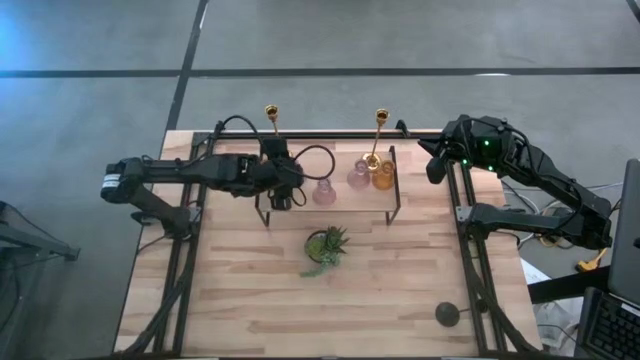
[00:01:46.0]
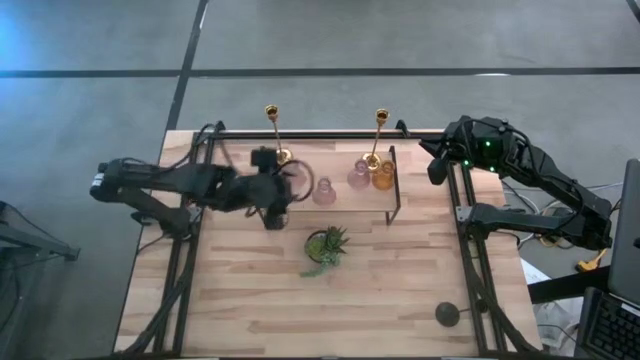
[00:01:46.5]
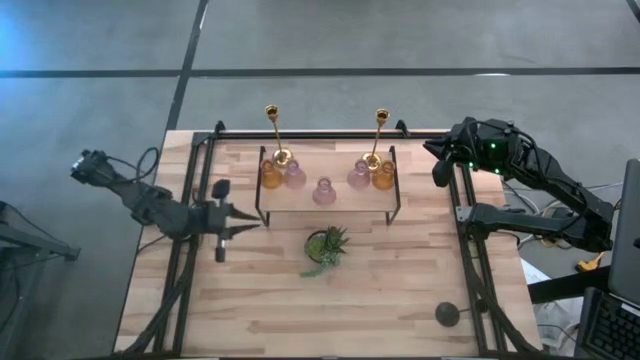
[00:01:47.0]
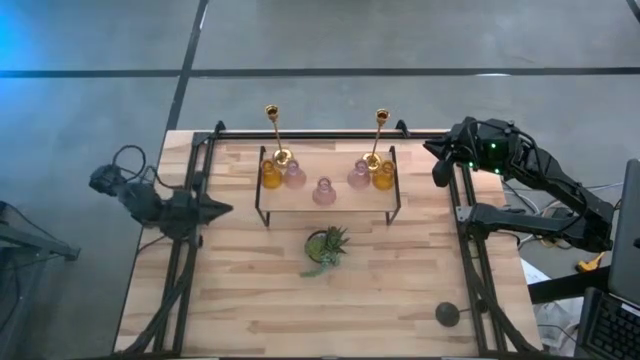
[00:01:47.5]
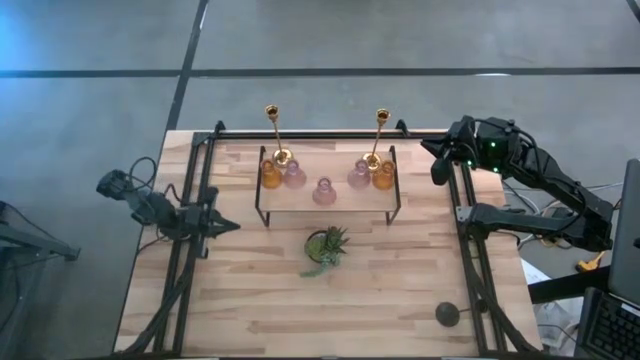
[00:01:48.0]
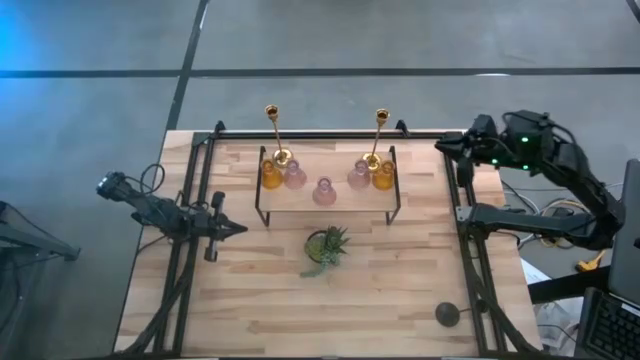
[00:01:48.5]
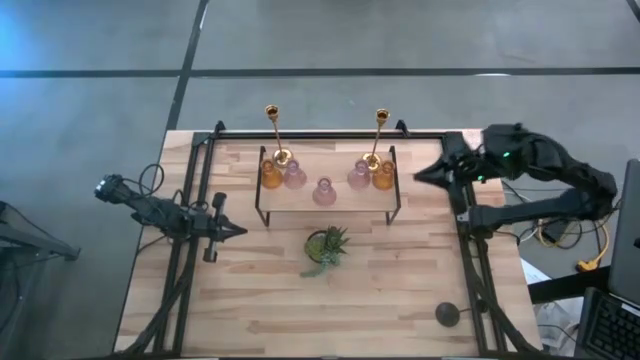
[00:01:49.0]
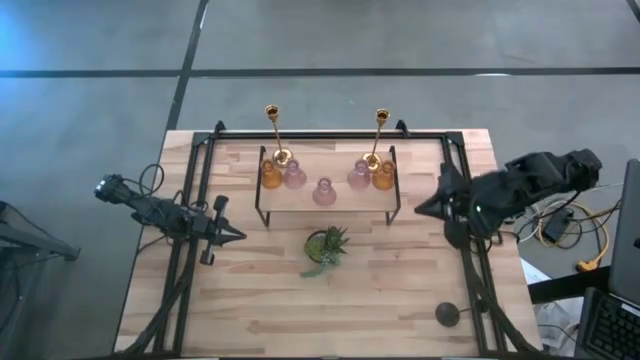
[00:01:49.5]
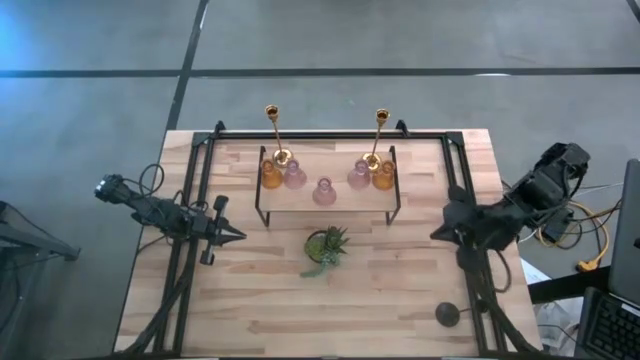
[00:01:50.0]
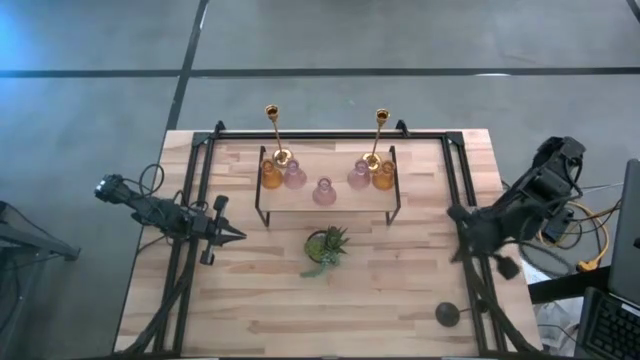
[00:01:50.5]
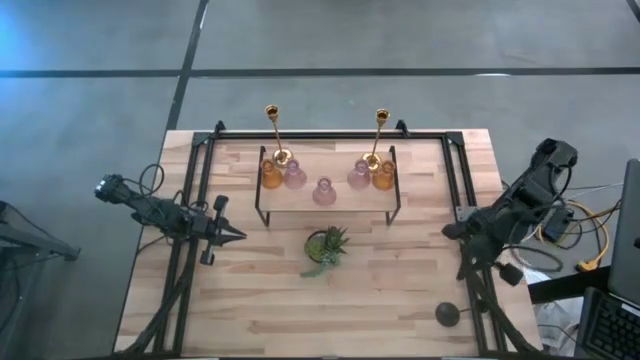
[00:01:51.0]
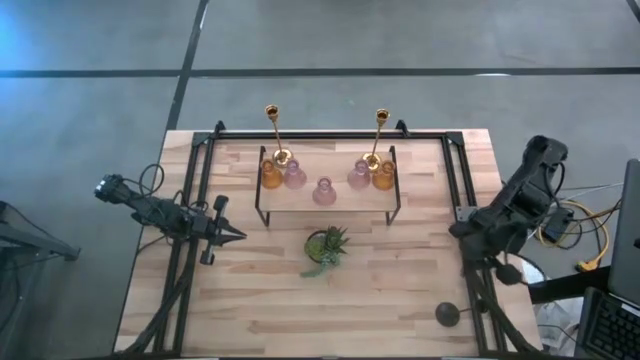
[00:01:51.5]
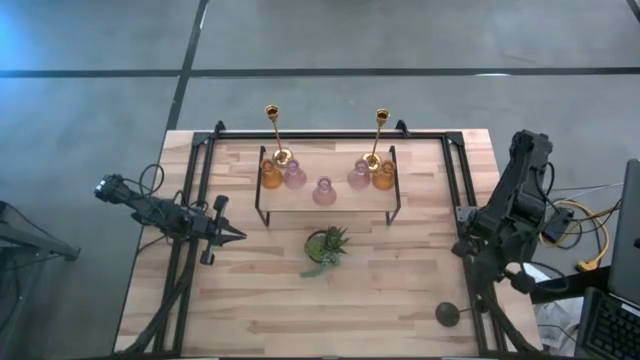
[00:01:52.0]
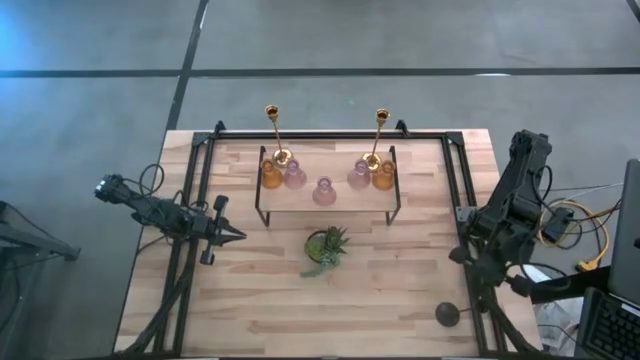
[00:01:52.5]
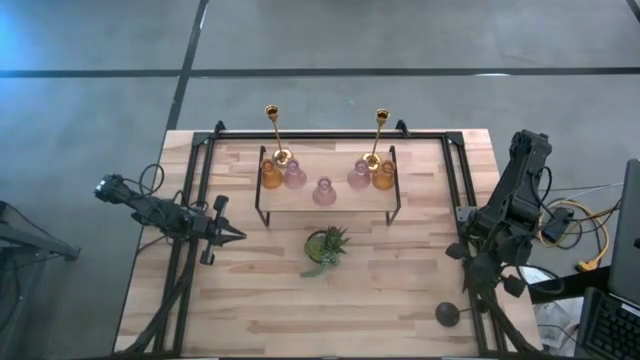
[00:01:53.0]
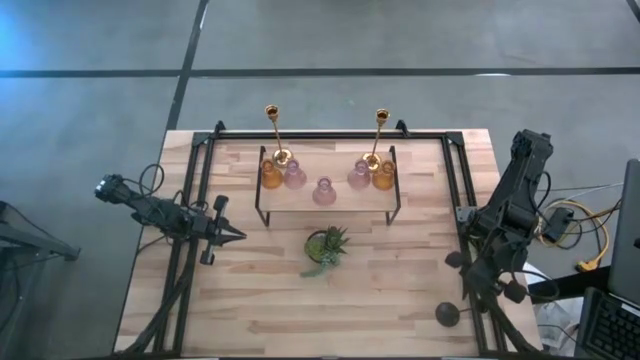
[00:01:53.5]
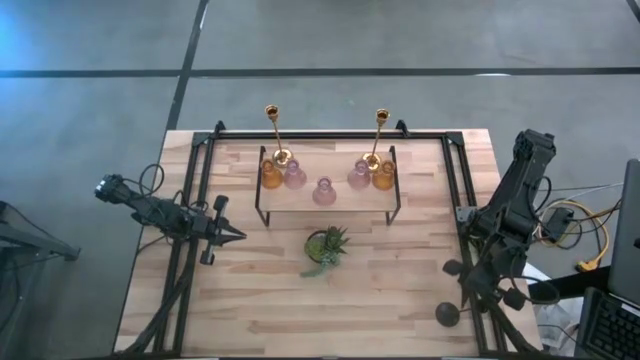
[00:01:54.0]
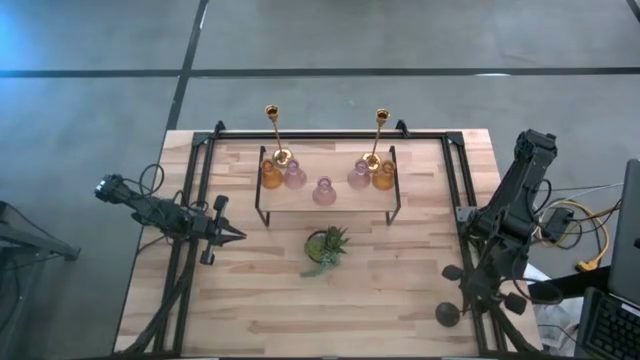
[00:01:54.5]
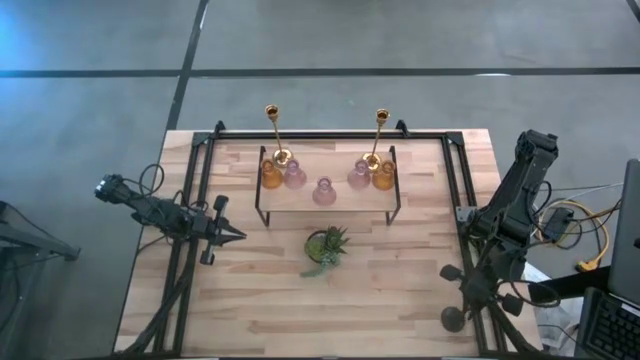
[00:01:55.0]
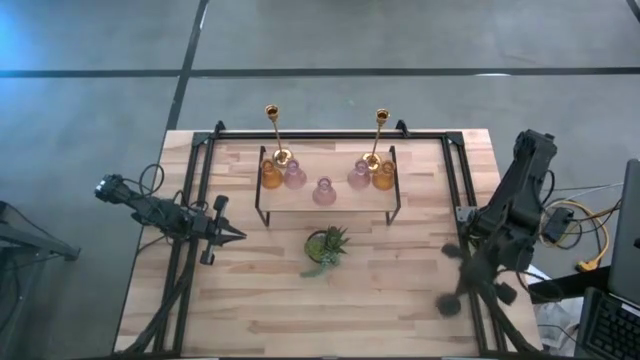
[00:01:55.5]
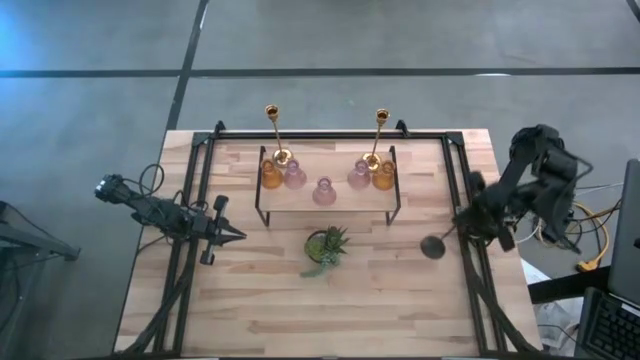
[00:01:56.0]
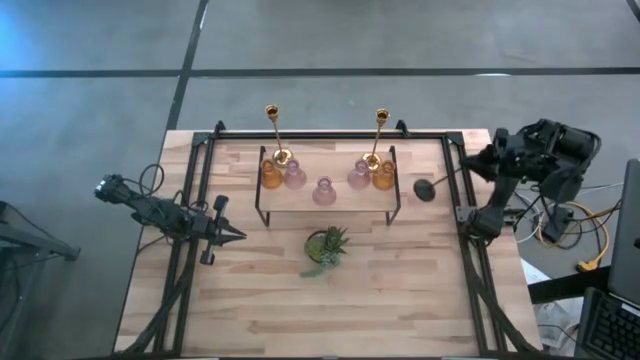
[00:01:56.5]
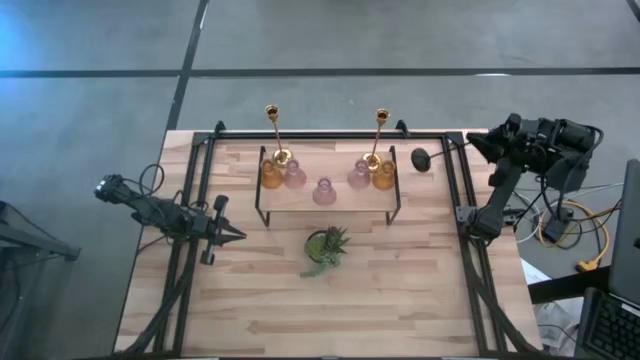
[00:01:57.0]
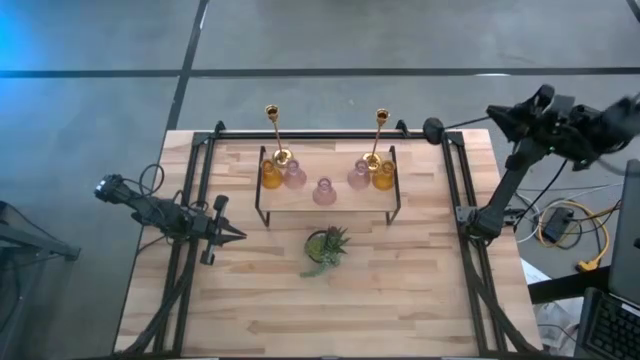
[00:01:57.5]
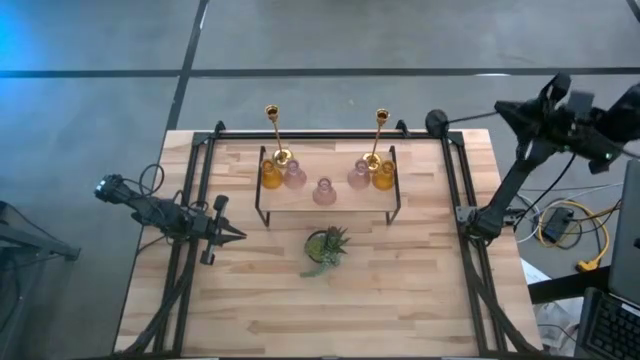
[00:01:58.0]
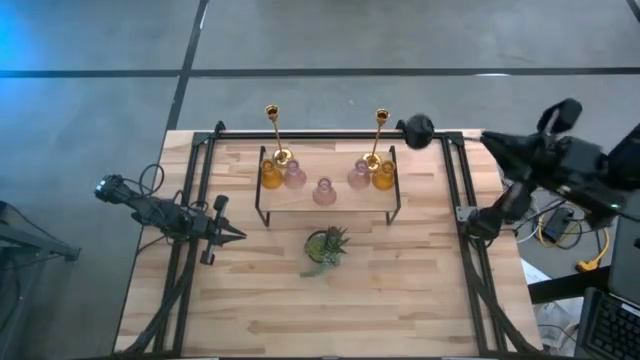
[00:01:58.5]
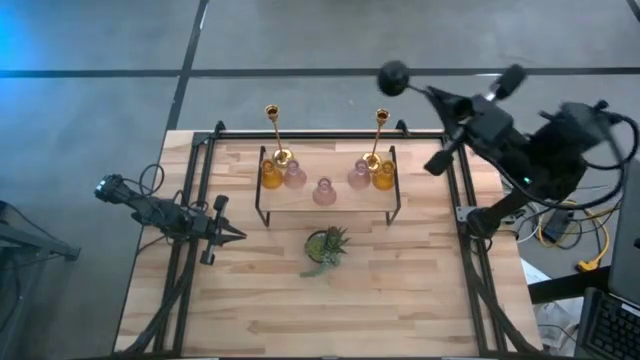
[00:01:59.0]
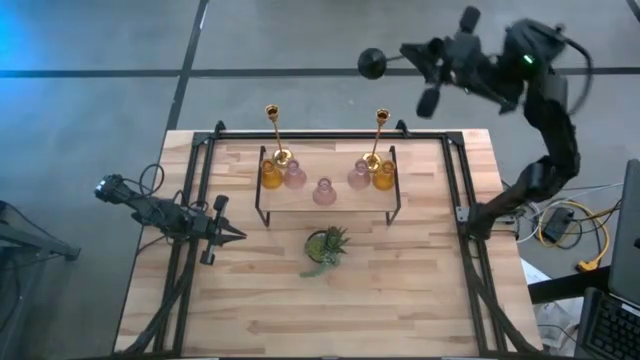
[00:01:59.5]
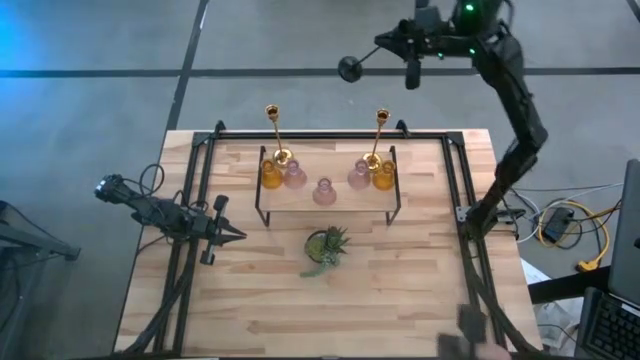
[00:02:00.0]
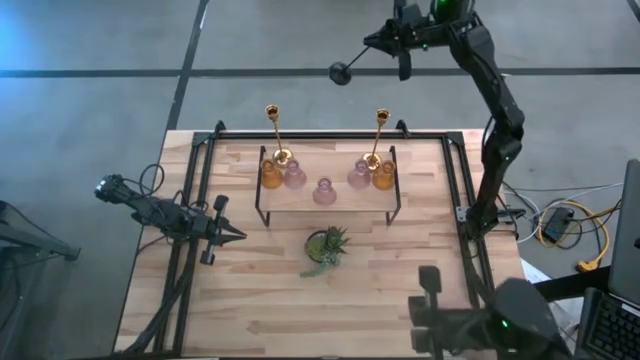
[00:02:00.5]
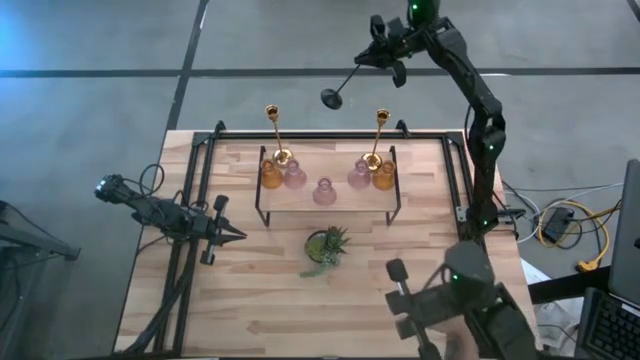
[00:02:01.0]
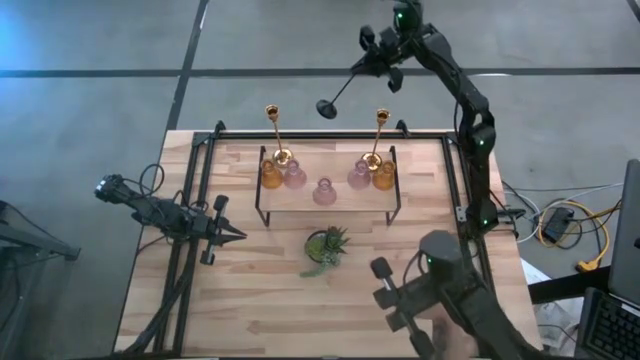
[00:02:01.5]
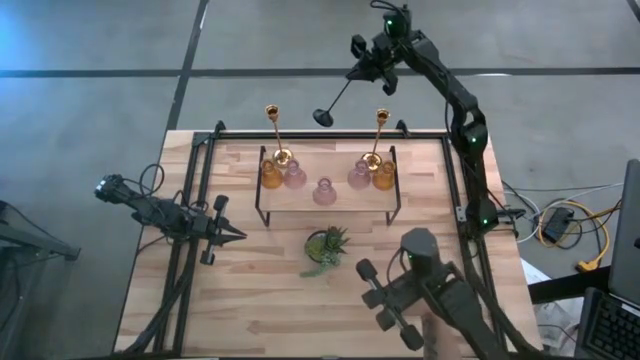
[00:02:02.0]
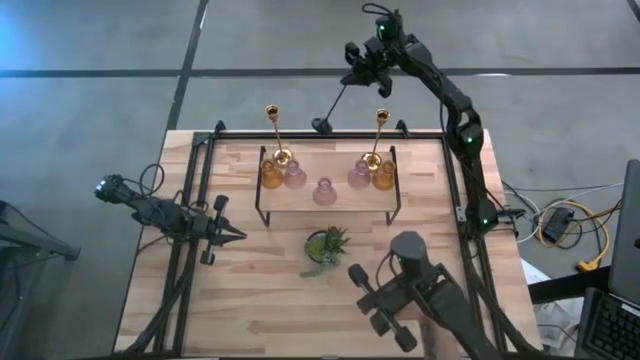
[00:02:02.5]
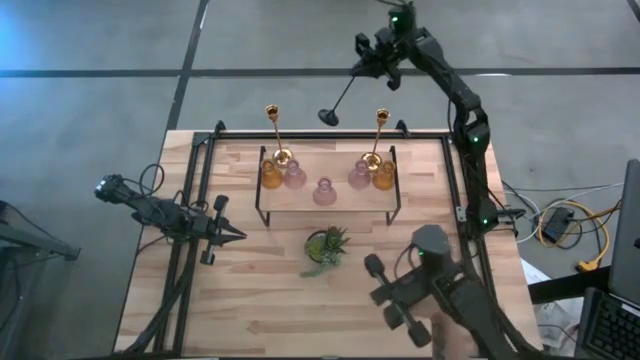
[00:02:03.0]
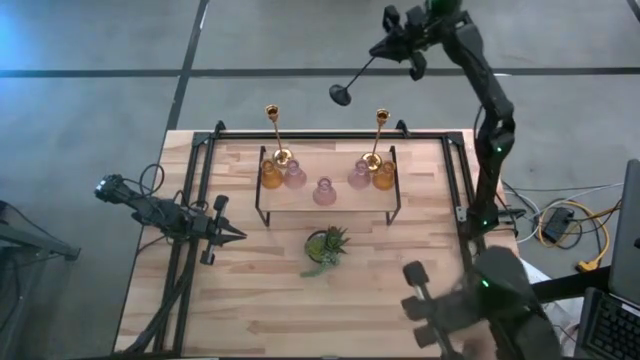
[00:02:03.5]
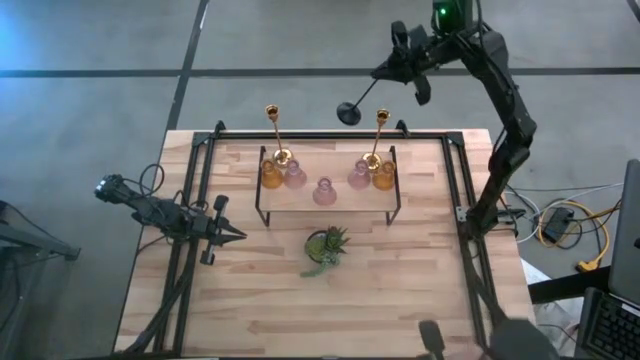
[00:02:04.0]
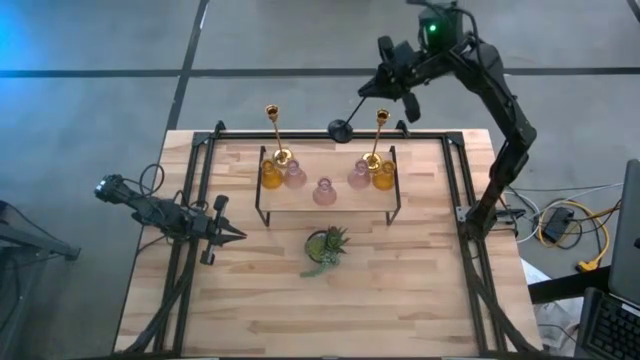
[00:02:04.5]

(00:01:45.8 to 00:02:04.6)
Task: Pick & Place candle stick holders
Put the black candle holder on the shelf

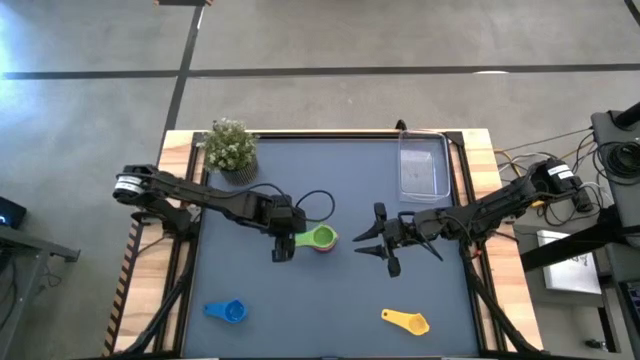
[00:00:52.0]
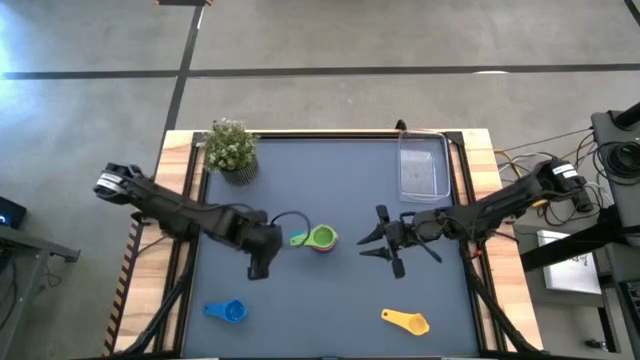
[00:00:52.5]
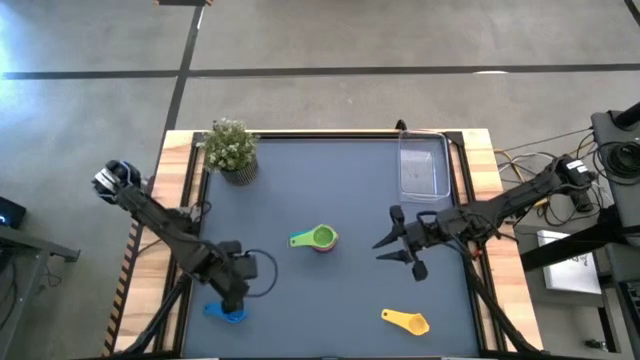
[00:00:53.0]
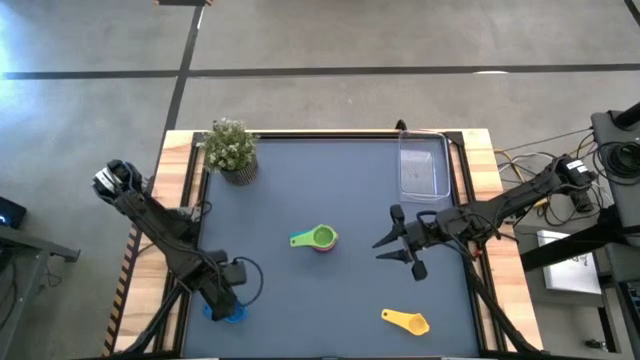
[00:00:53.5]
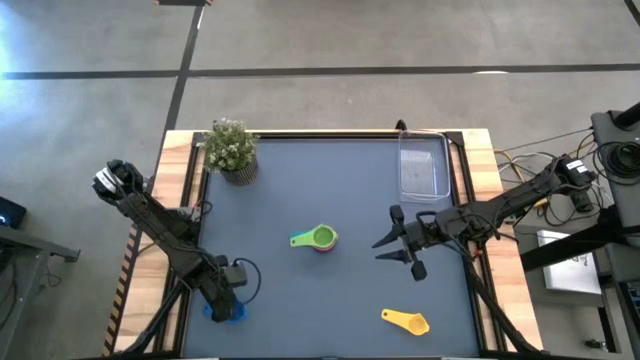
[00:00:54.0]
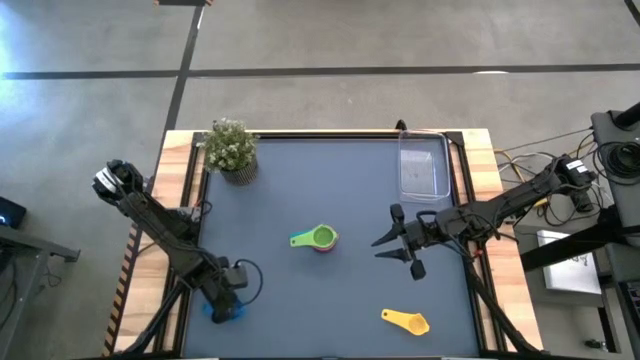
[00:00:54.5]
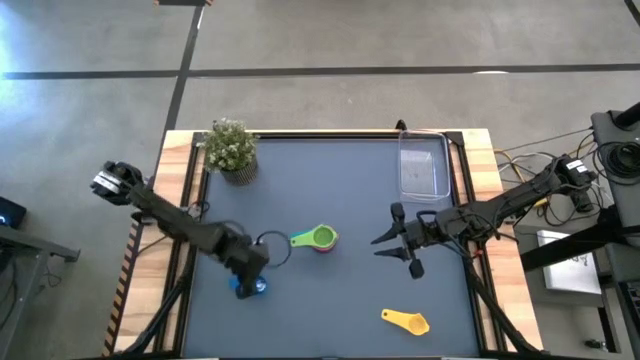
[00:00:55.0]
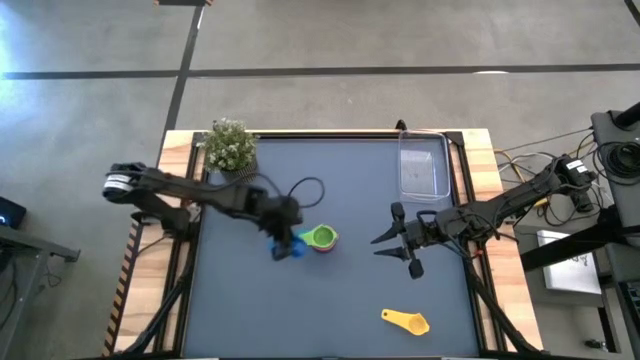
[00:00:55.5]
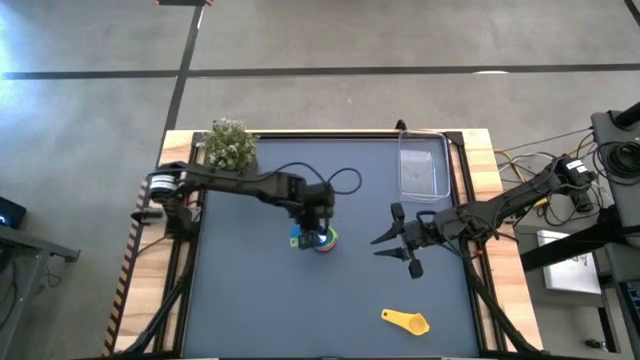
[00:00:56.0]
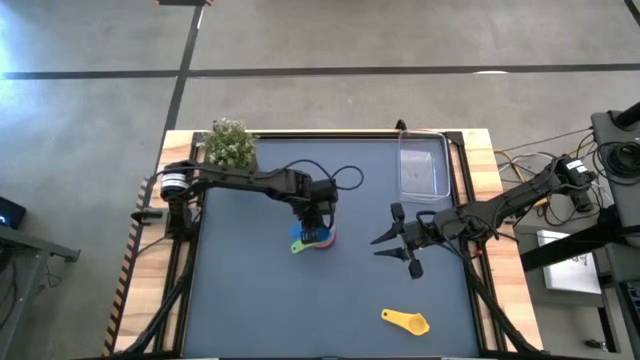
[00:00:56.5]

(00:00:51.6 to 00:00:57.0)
Task: Nest measuring cups in basket
Stack the blue measuring cup on top of the green measuring cup
